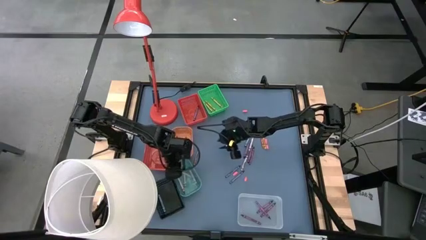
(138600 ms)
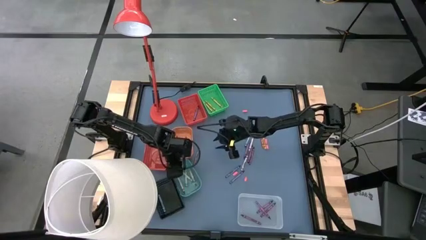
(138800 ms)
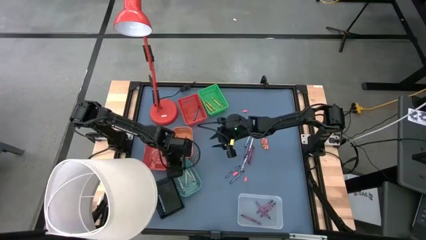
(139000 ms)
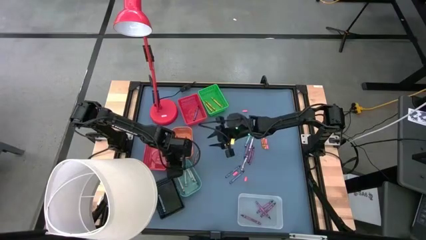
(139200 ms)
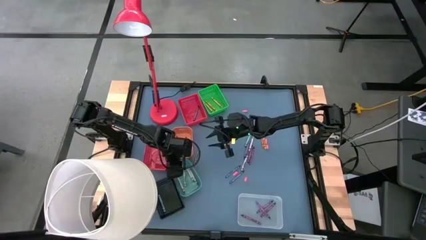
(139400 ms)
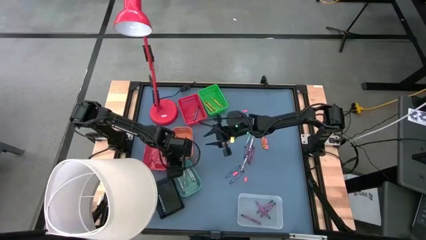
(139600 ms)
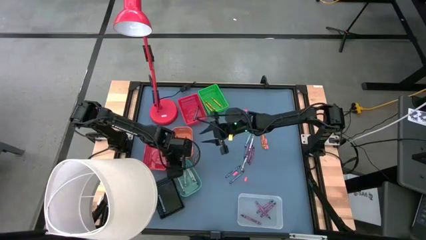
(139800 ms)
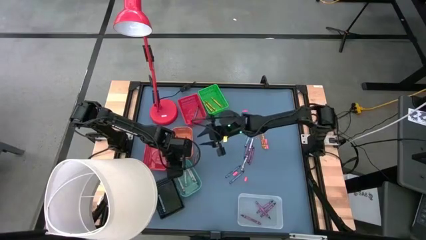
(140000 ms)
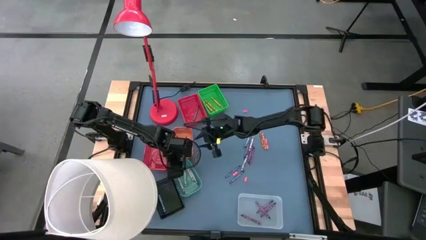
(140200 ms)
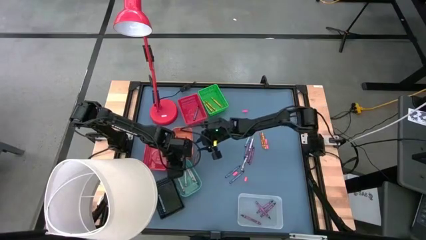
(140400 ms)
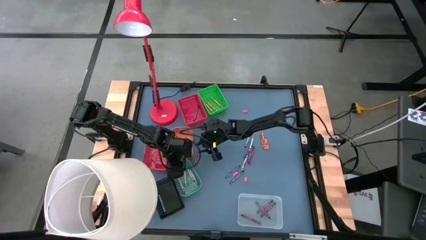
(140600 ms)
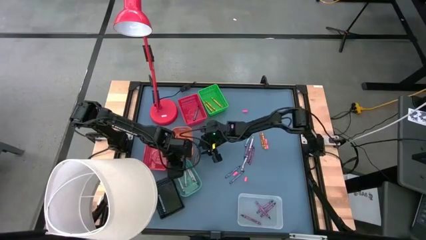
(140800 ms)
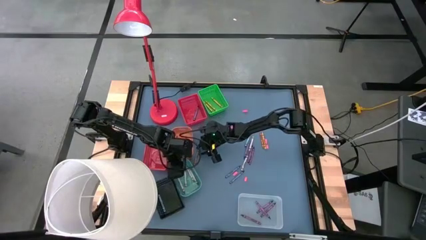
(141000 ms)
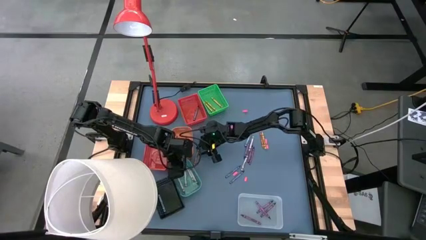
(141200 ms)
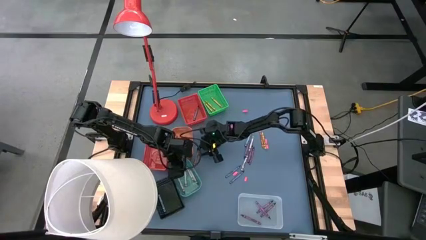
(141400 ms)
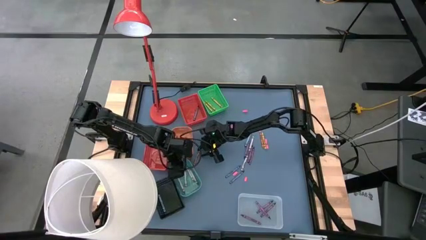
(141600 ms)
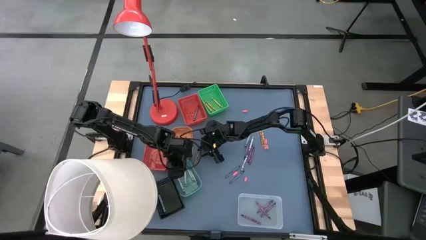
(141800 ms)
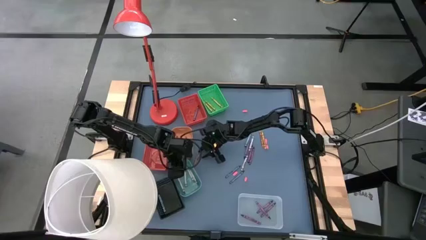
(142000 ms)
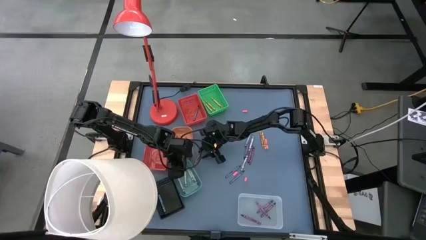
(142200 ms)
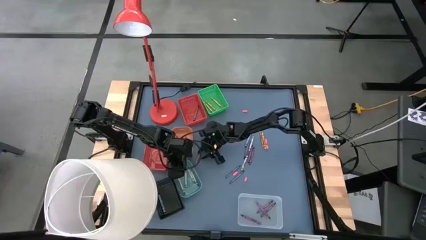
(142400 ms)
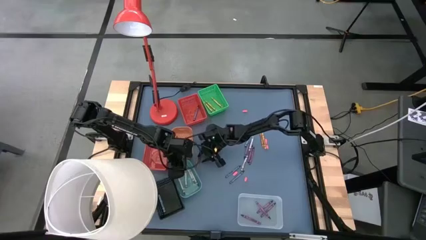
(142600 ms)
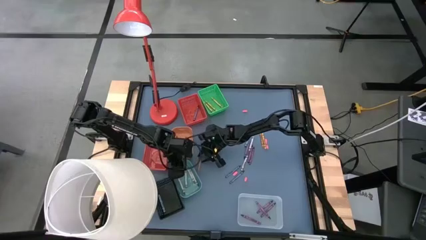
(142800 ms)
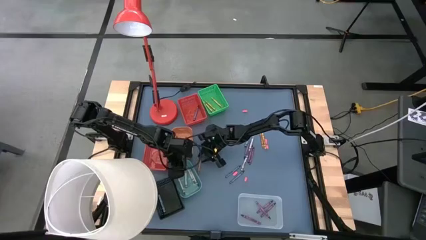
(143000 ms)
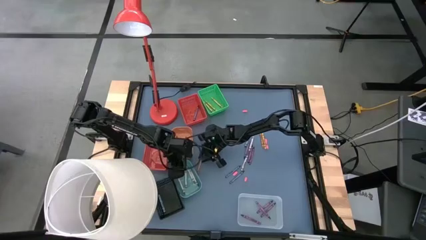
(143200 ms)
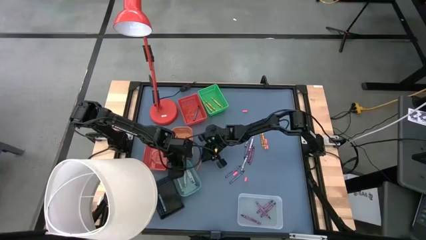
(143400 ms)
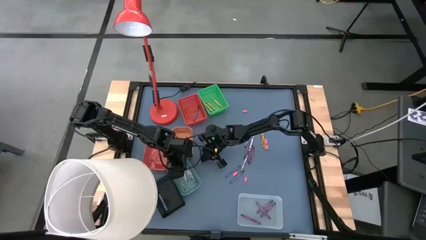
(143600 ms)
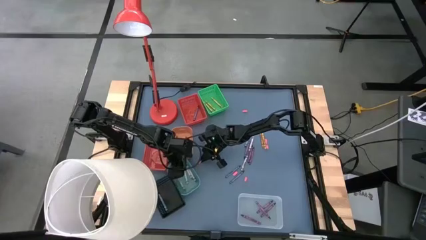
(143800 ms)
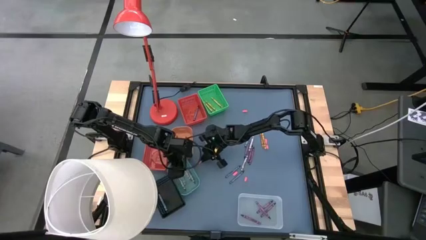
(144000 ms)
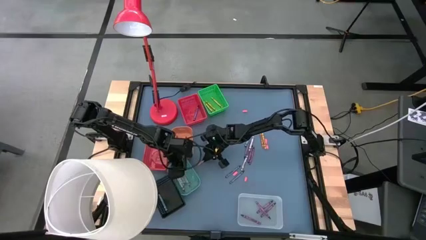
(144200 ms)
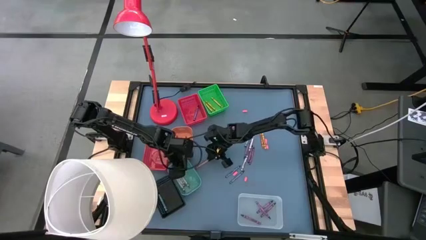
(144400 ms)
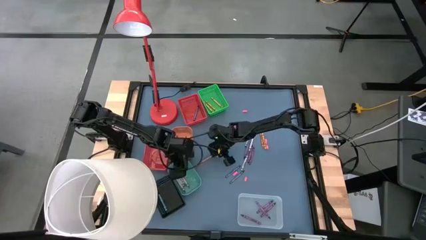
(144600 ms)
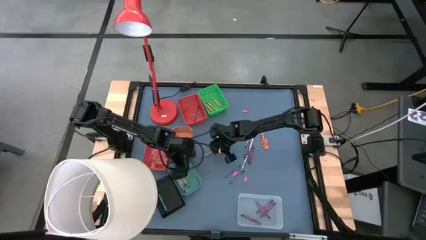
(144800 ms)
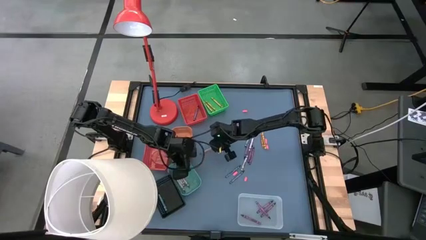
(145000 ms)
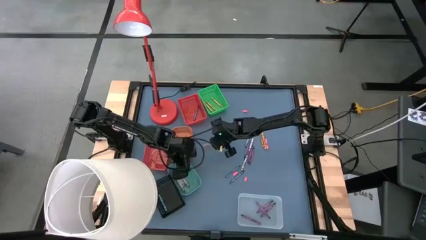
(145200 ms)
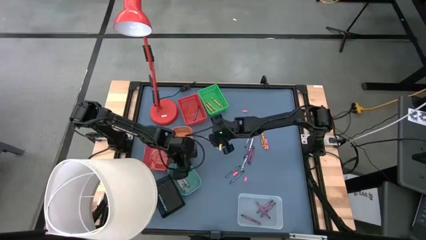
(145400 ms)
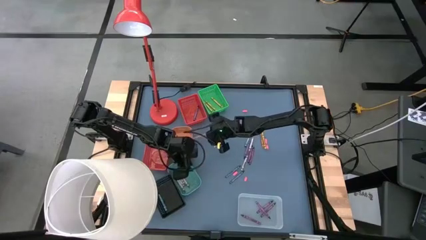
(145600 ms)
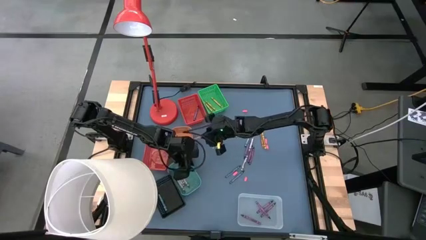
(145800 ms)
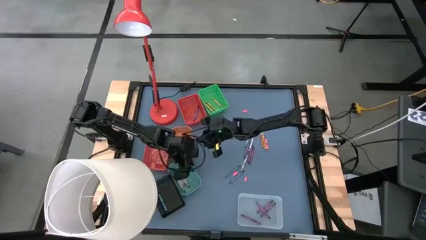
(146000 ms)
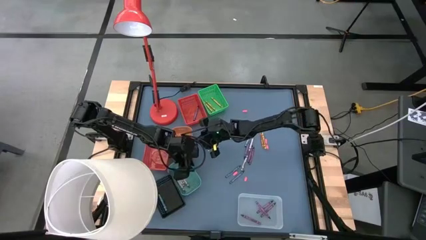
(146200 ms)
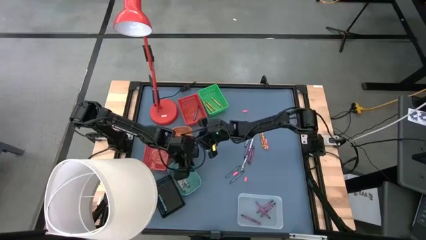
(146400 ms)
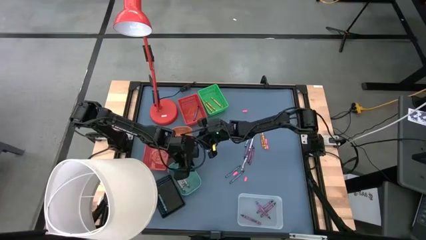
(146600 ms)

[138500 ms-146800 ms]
Task: Sort crayons
Put the brown crayon into the orange bin

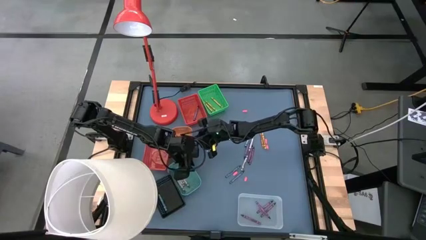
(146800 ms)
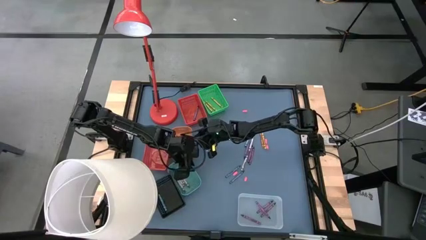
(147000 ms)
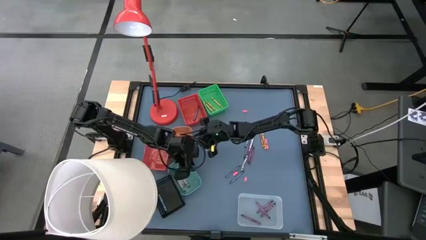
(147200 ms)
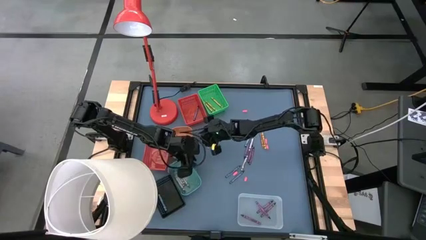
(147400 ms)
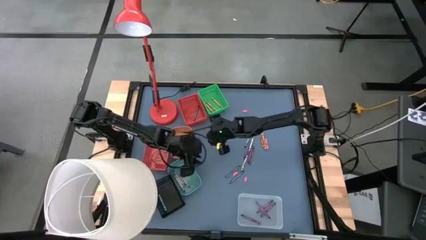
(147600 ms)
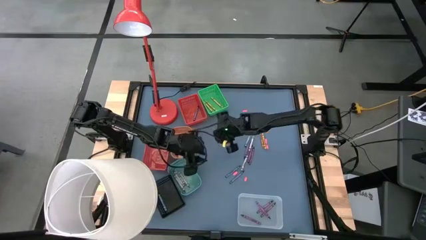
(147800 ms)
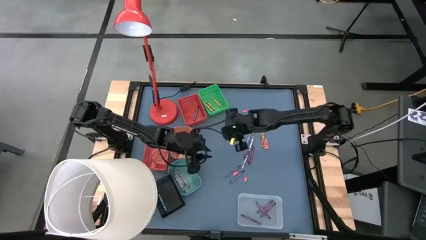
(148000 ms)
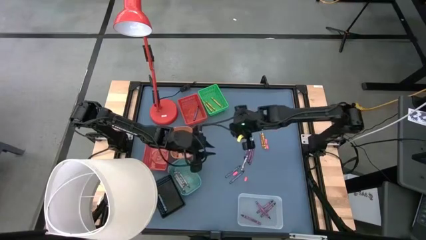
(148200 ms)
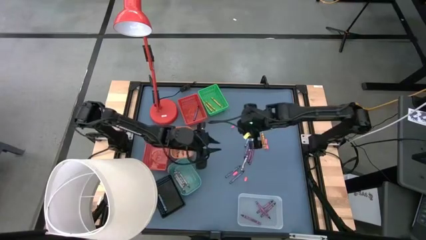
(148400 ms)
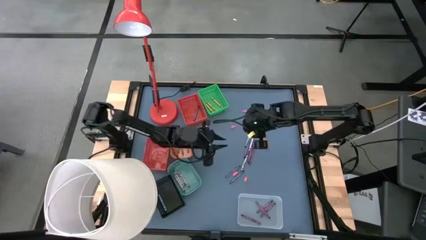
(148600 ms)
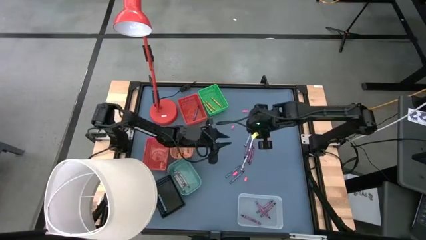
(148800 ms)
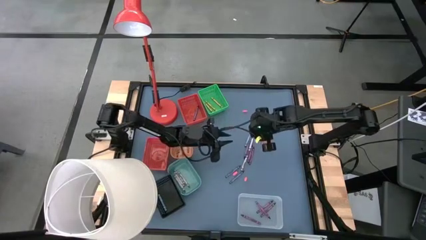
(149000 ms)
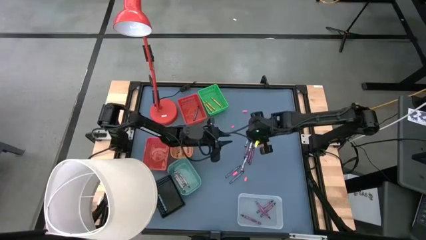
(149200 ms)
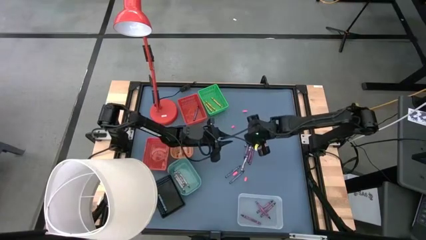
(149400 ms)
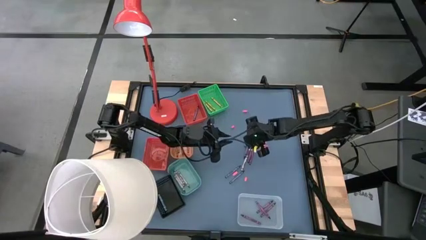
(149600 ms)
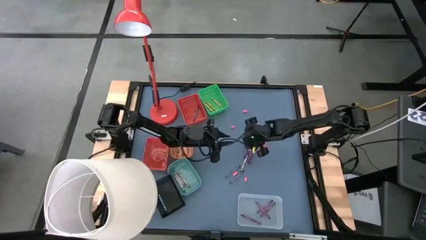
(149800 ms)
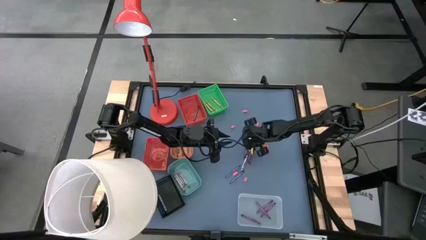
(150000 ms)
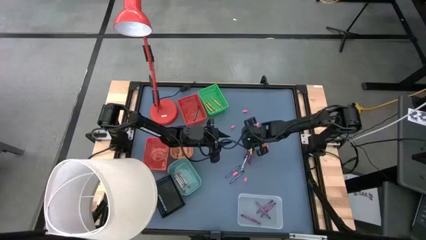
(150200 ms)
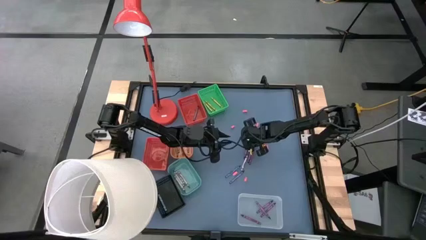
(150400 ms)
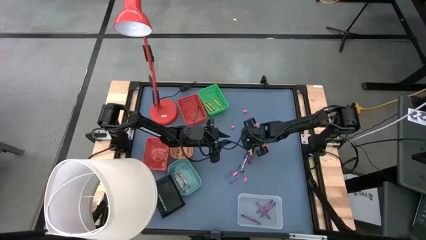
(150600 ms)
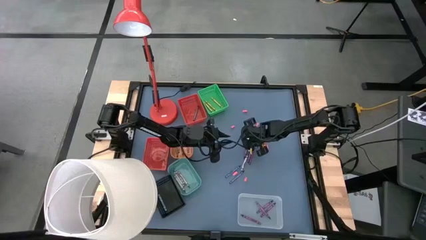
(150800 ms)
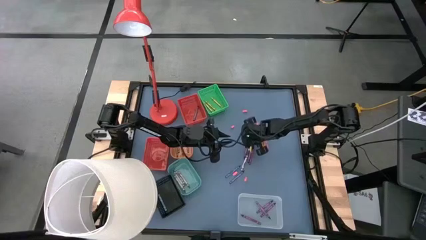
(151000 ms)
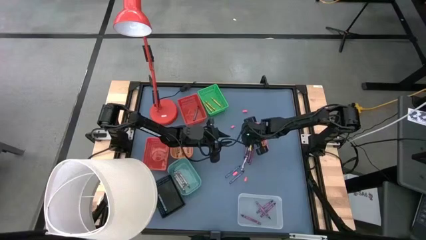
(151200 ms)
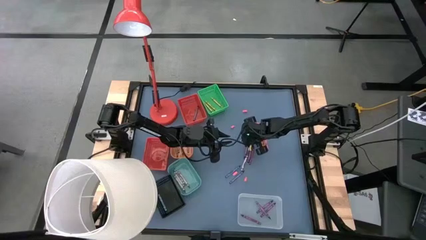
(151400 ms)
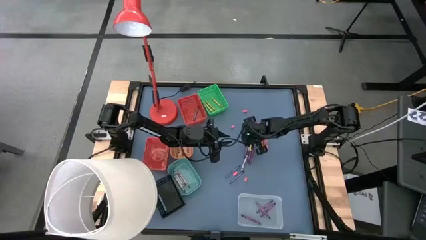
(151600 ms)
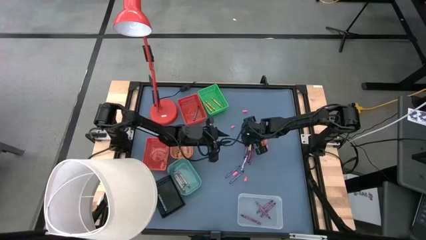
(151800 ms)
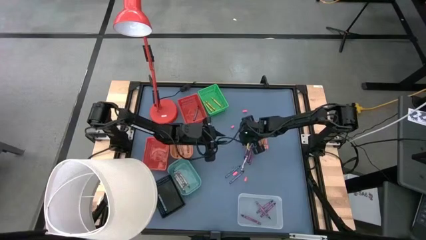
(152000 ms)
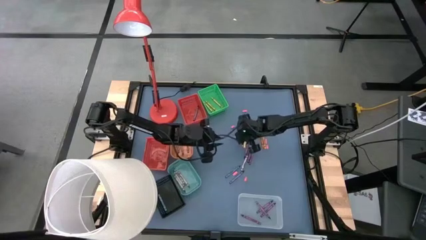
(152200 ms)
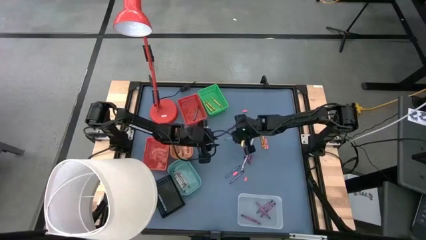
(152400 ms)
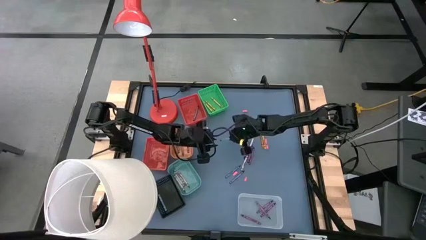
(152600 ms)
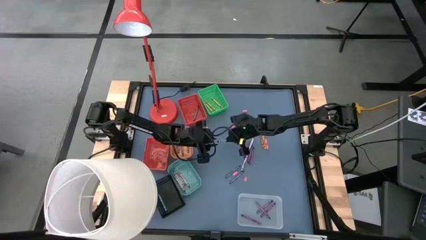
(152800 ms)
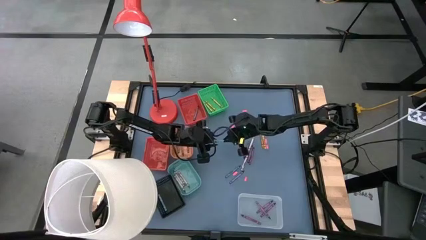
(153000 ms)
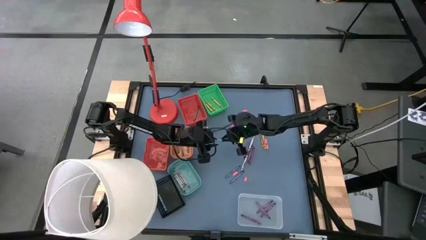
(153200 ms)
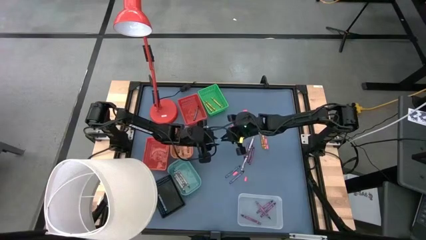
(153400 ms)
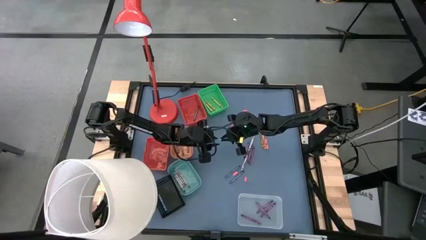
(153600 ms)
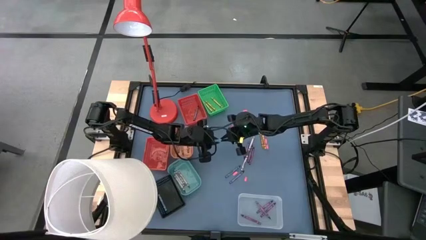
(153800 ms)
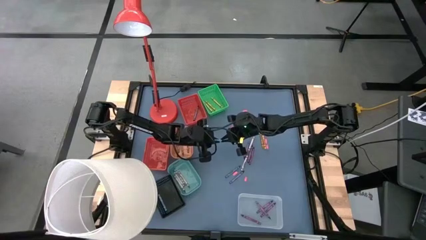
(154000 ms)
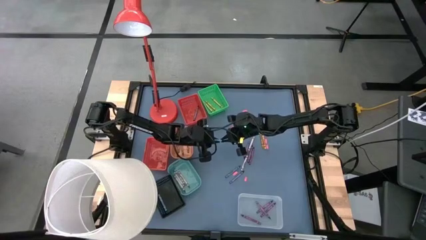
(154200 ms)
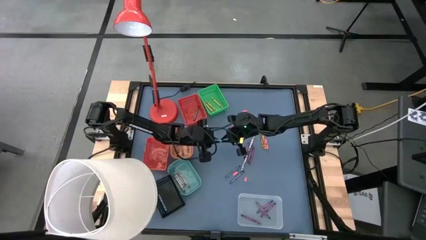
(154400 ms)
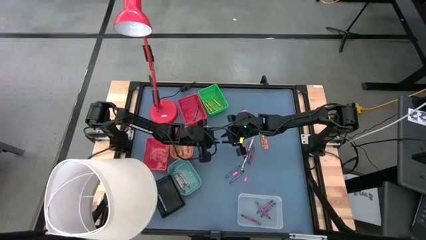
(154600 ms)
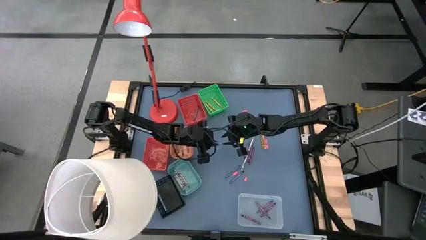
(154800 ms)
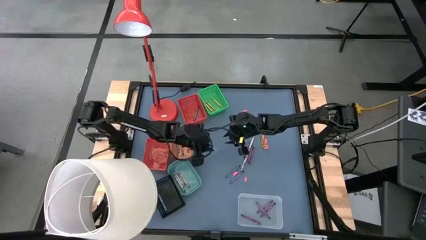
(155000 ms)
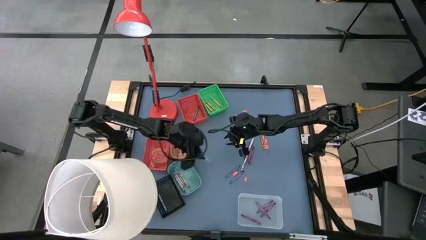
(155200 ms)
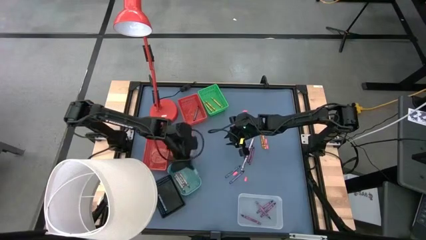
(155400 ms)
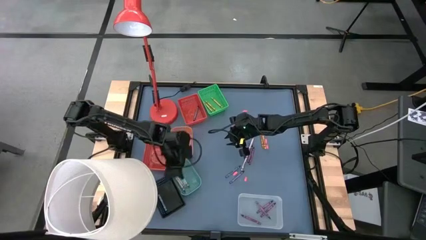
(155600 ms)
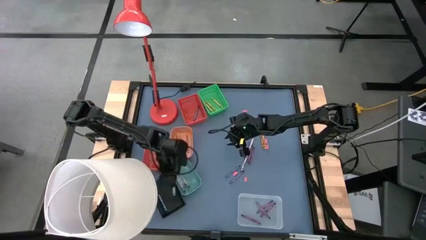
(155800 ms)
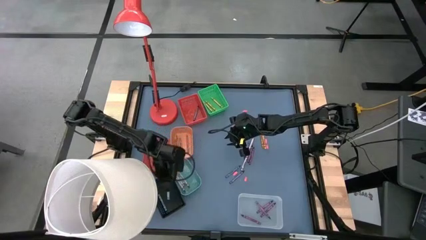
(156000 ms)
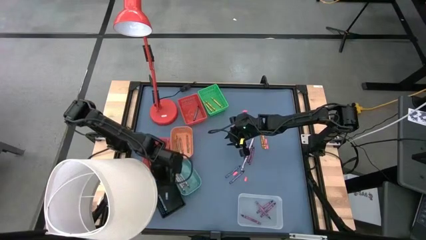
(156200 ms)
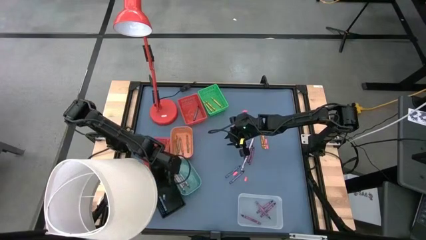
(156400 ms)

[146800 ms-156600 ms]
Put the light blue crayon into the black basket
